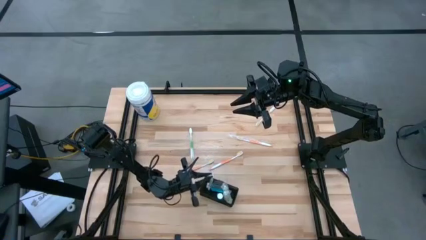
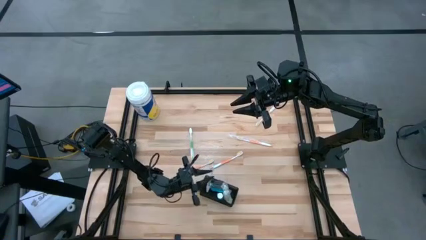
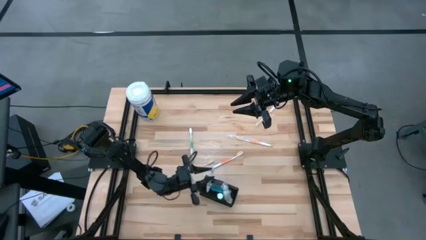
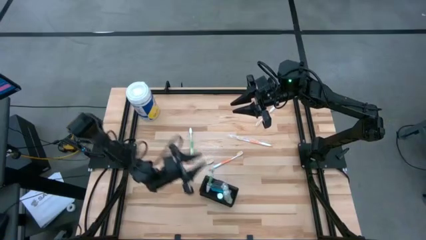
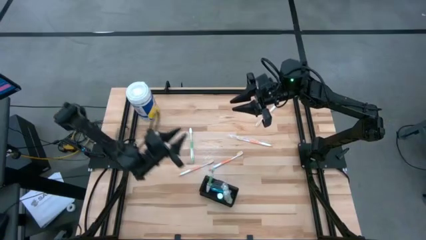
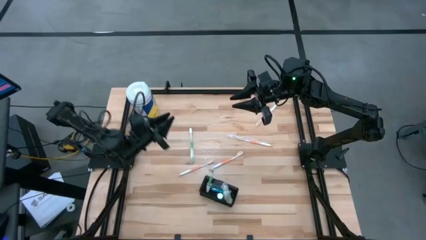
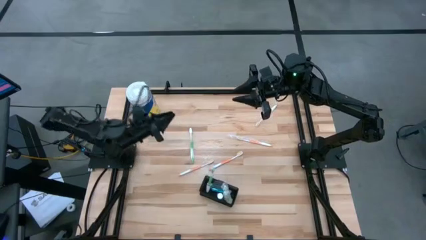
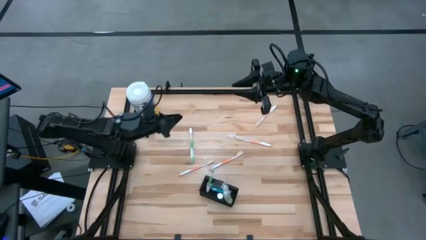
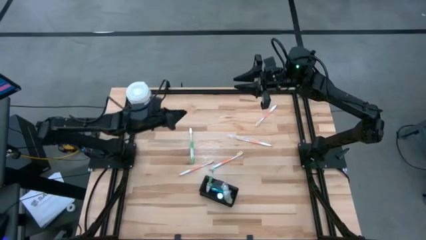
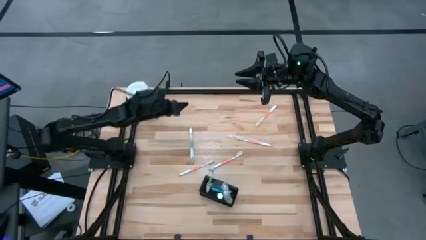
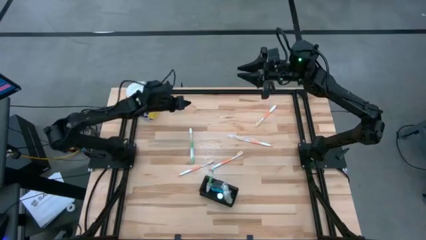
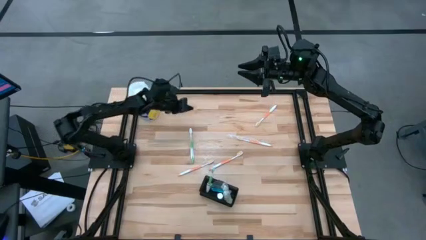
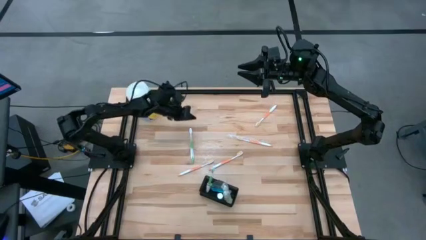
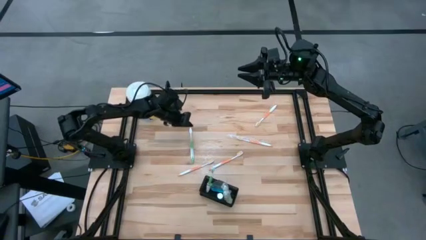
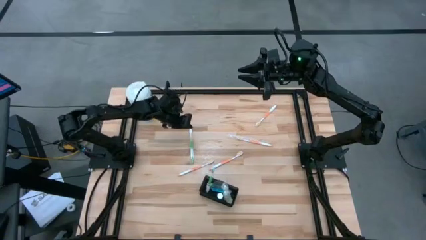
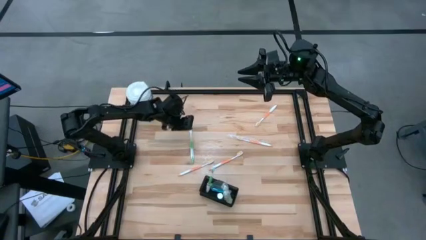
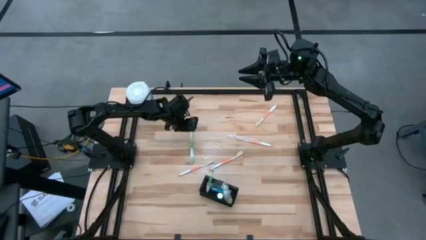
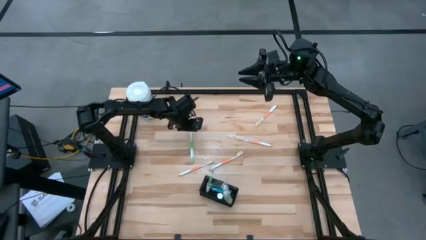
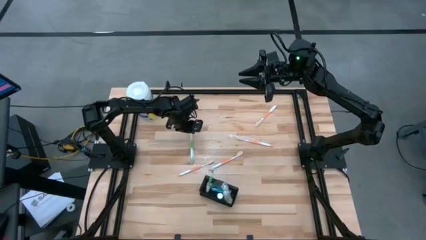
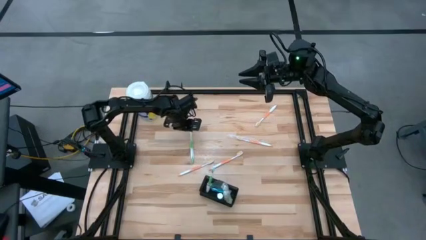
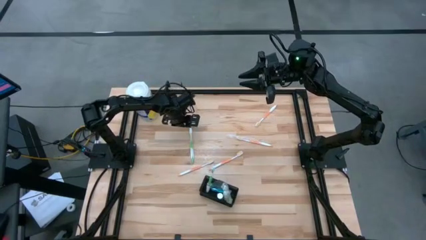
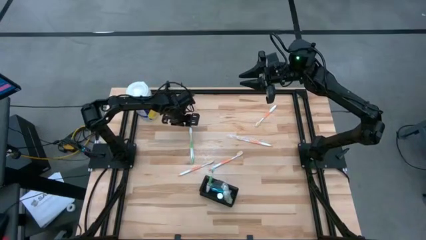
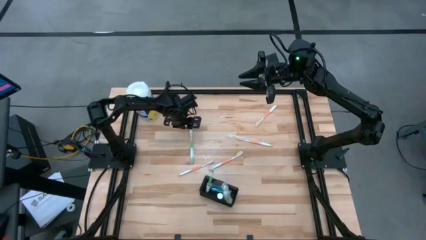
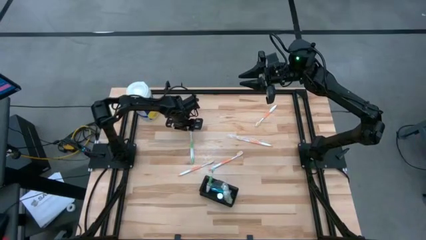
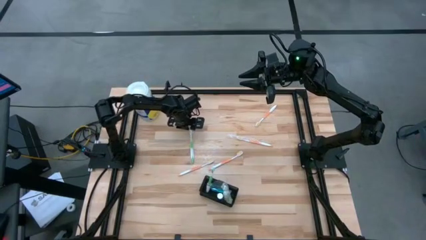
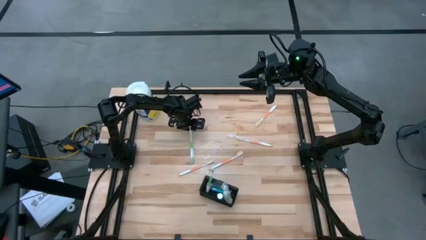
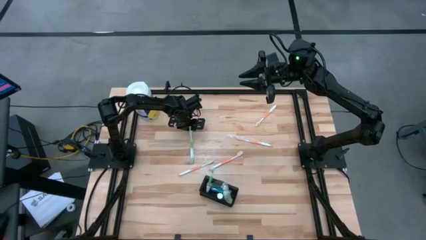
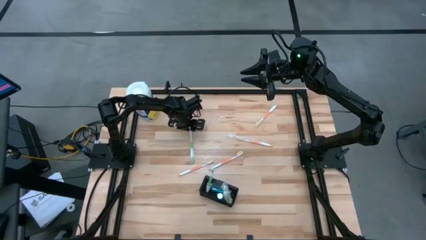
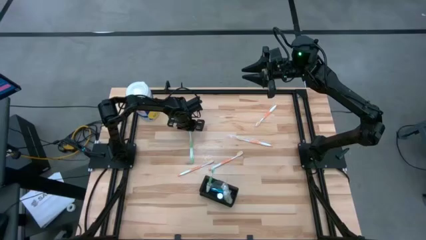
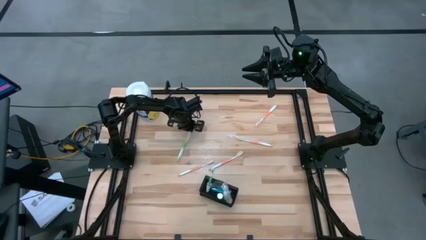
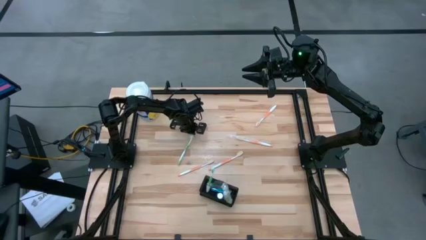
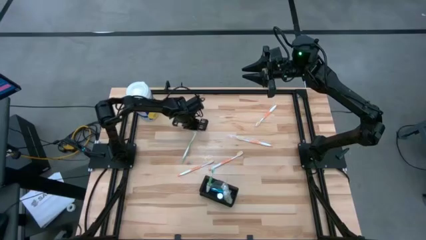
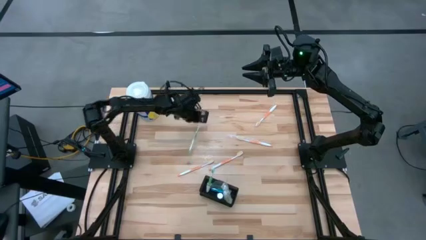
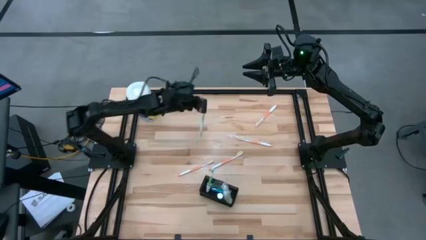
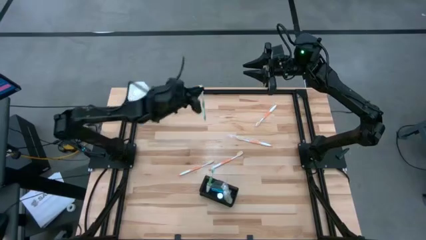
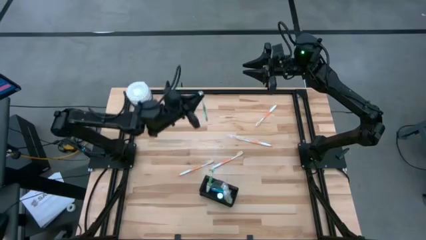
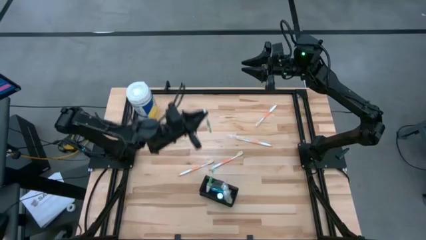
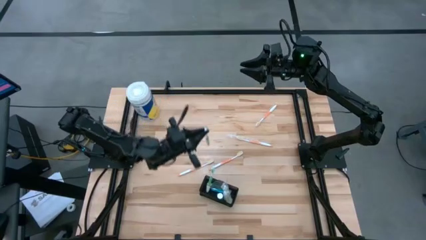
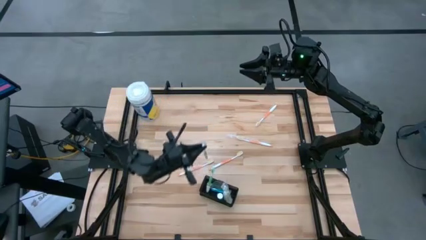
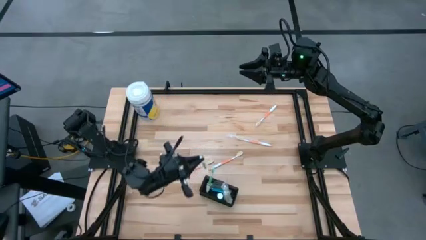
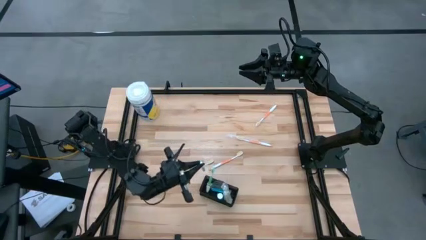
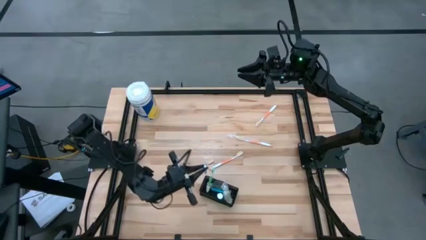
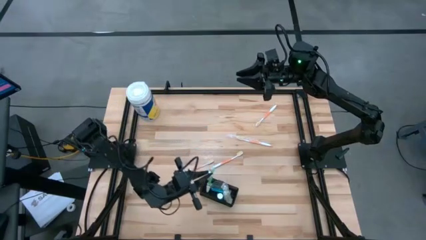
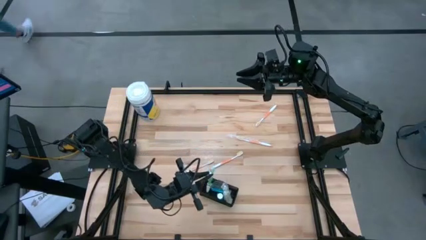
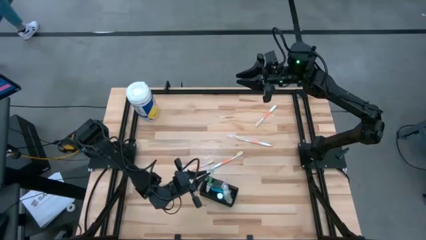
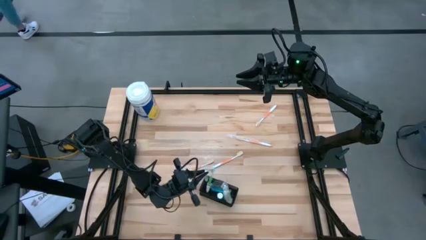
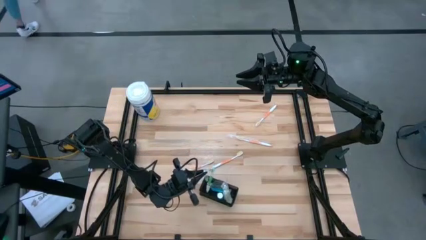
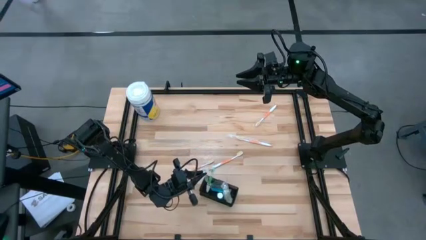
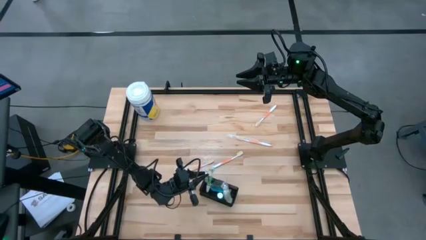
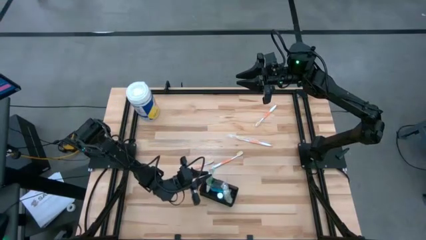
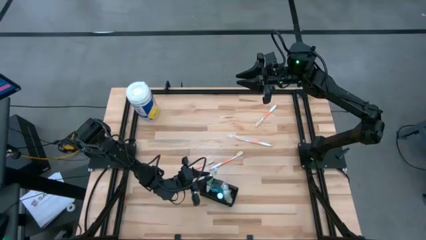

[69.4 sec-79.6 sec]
Task: Pick & Place toothbrushing station
Put the green toothbrush into the black wire organizer

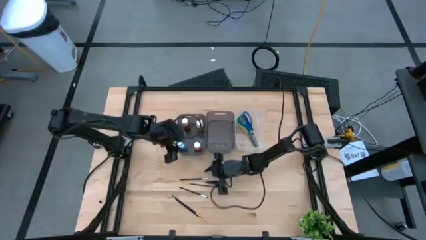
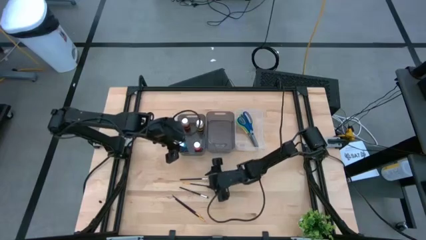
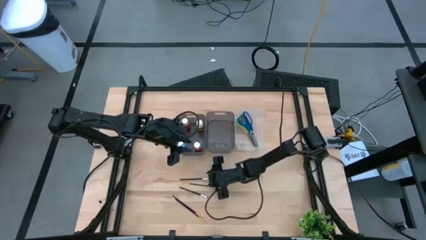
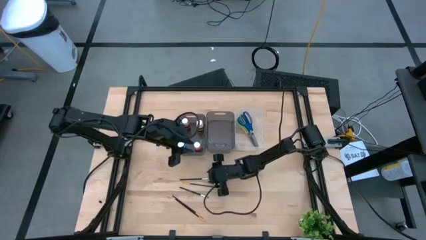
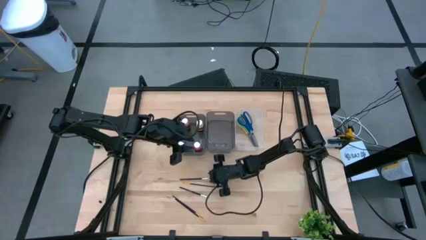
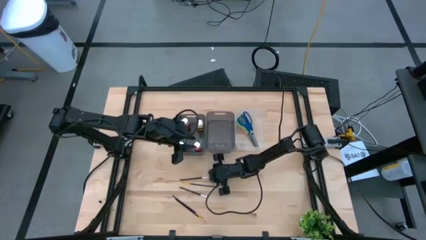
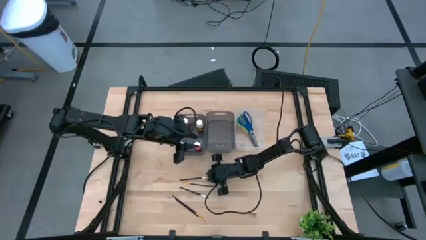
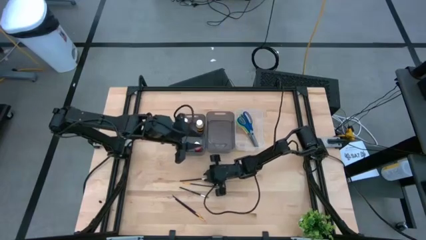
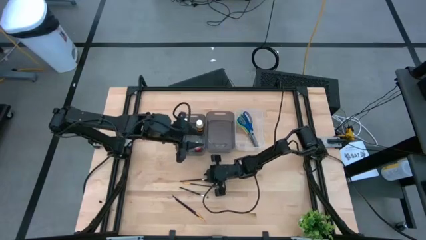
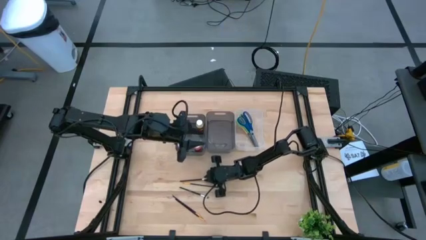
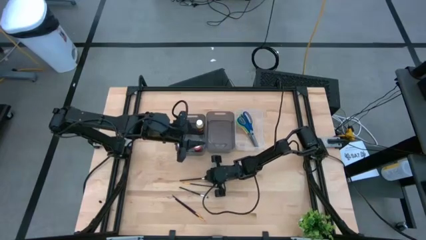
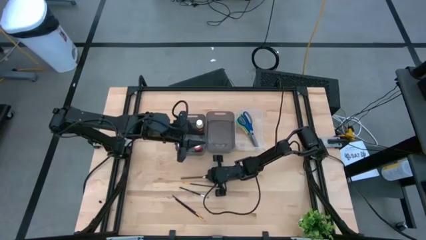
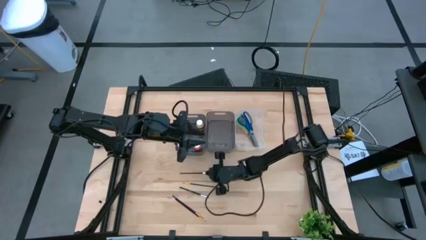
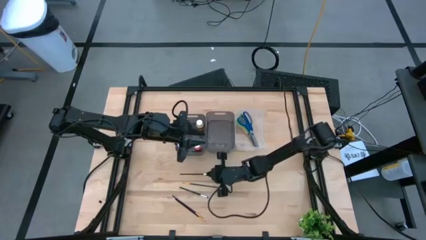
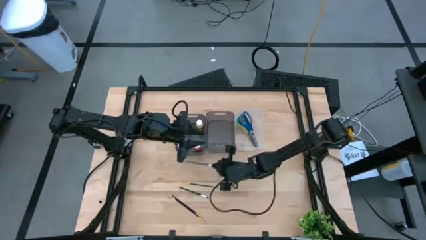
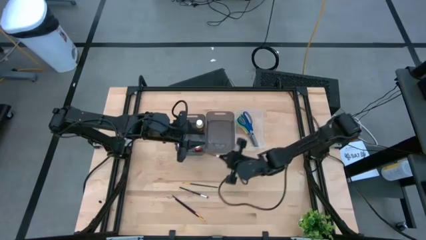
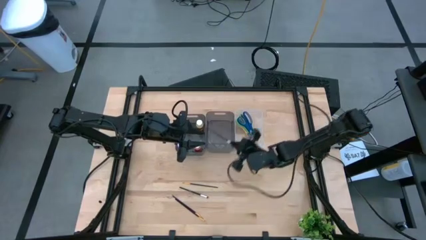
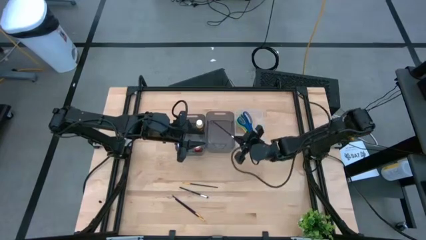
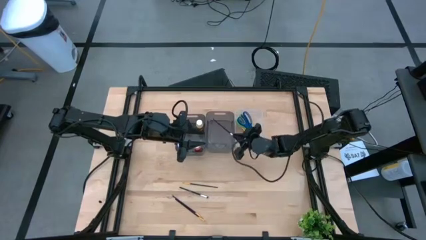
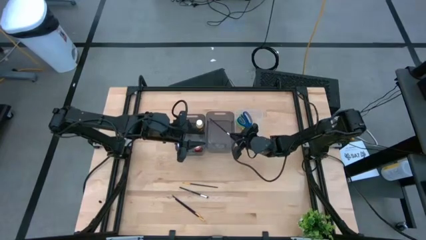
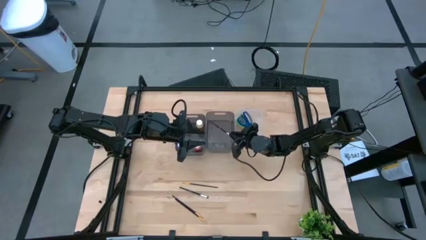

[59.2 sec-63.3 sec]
Task: Pick & Place Paint Supplies
Put the top silver paintbrush into the right black bin

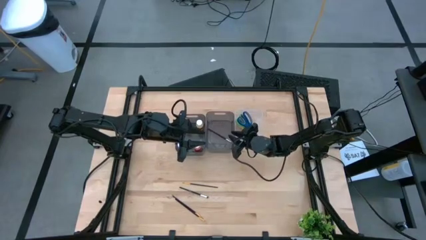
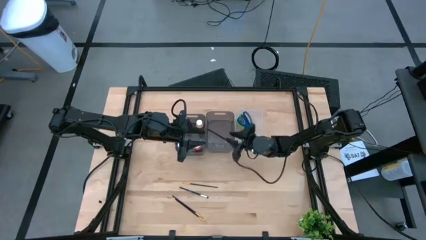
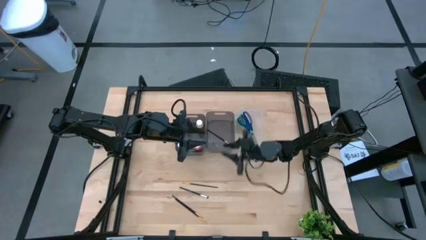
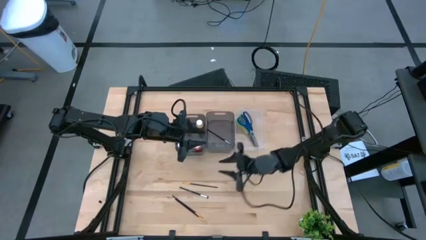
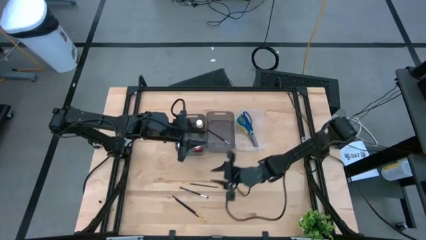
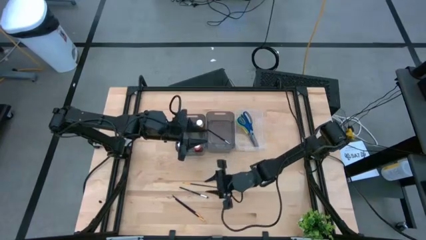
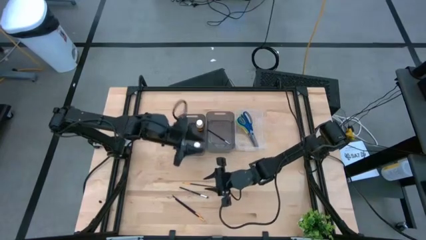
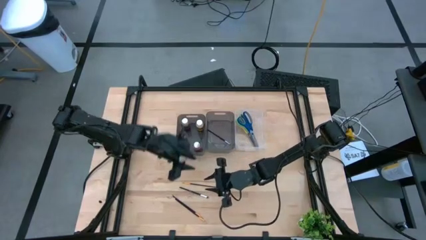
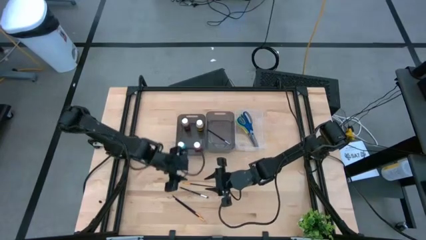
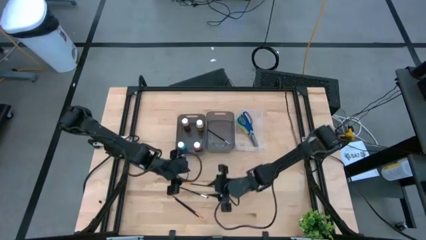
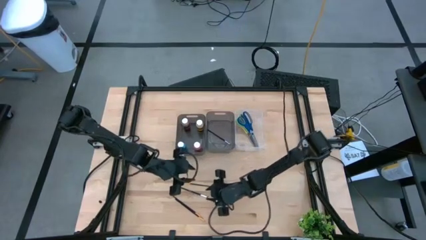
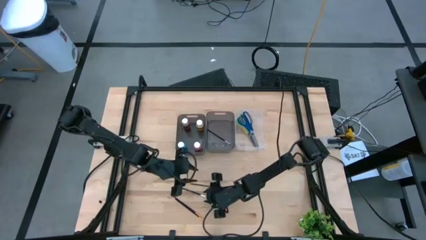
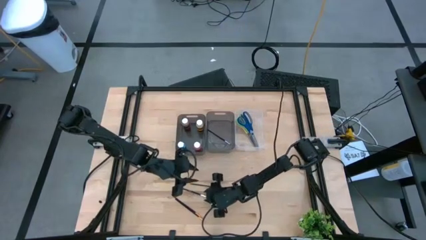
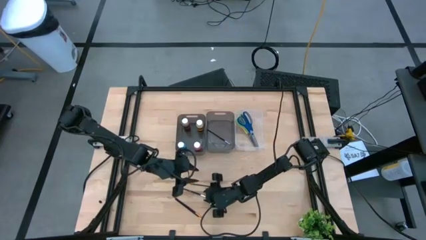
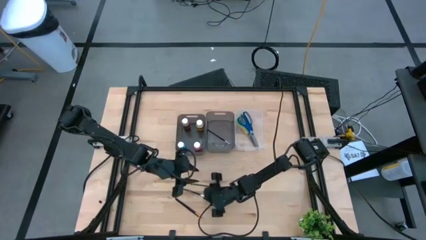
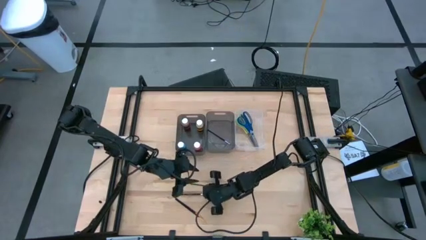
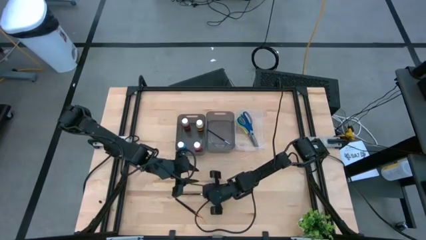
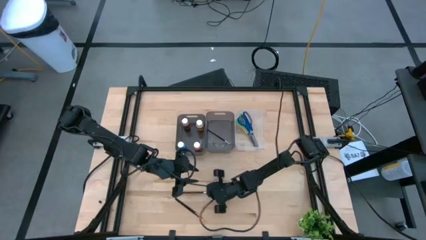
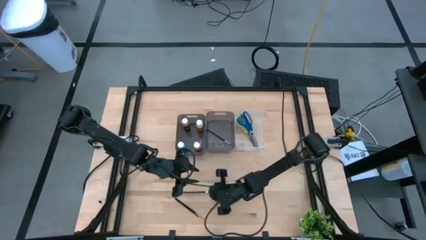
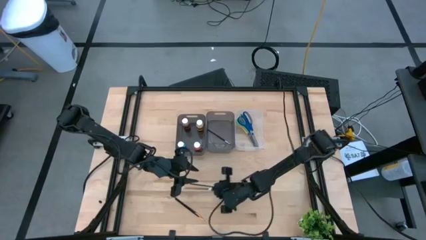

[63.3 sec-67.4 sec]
Put the silver paintbrush into the right black bin
